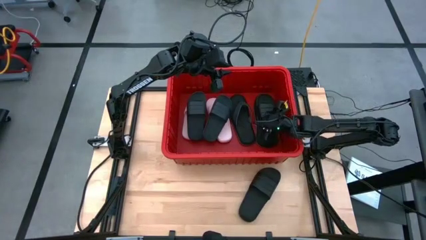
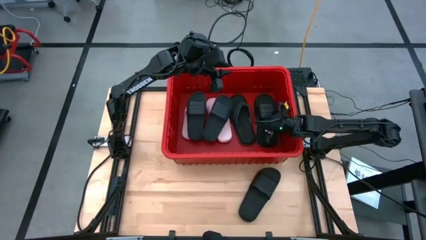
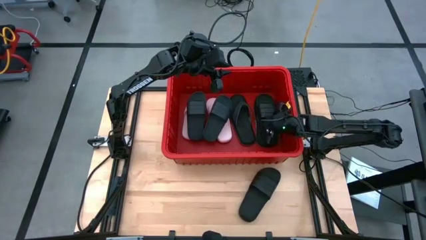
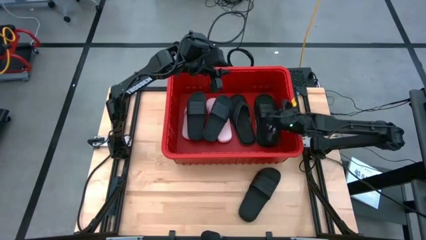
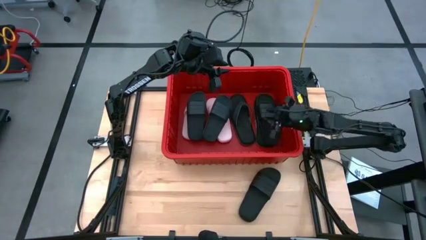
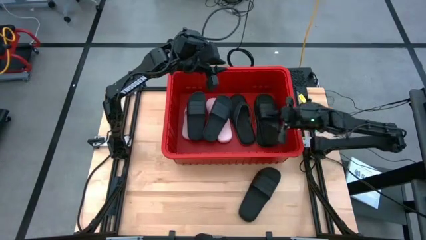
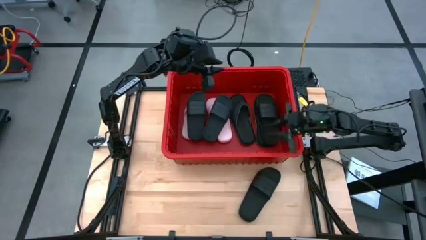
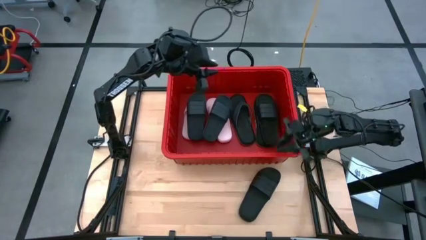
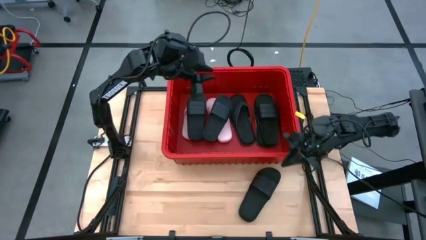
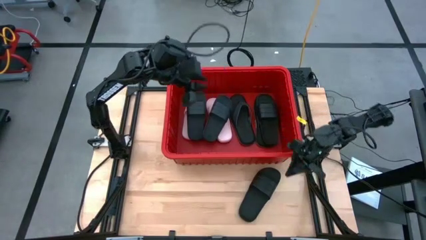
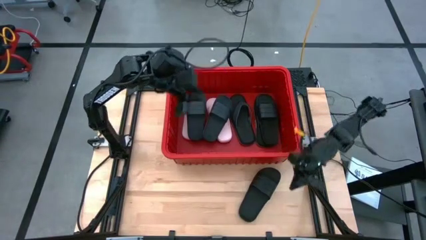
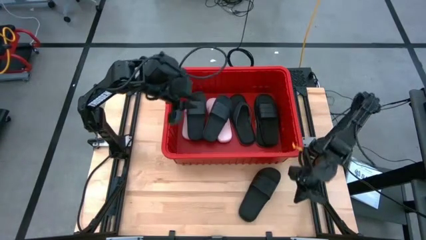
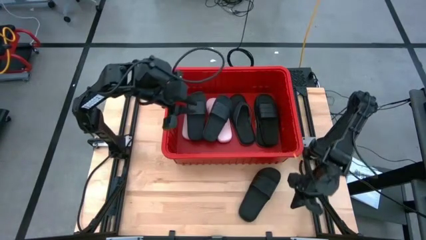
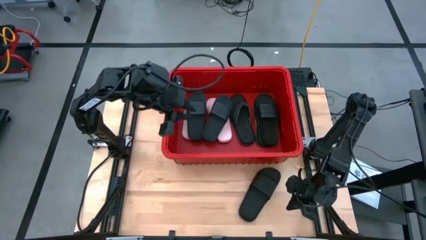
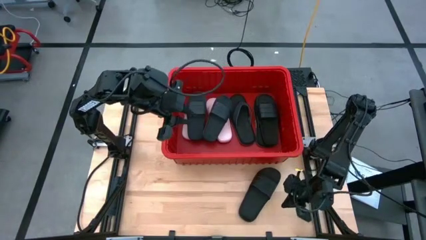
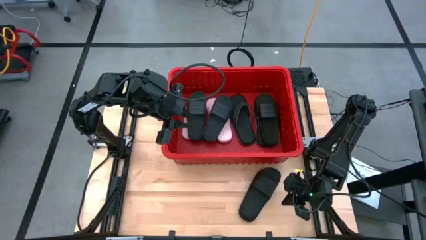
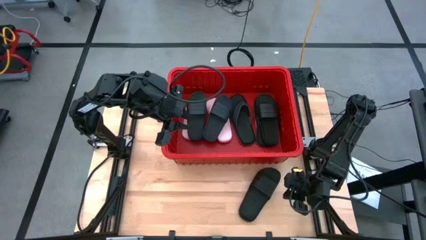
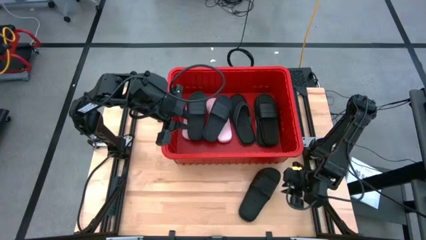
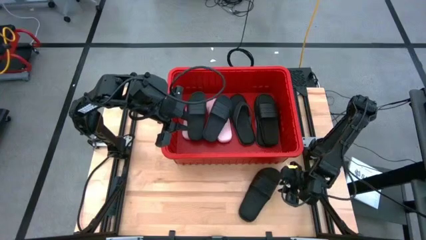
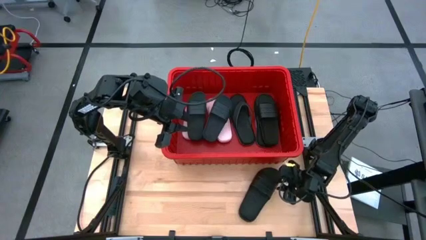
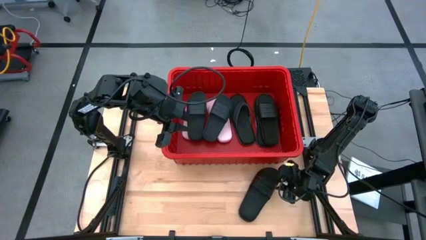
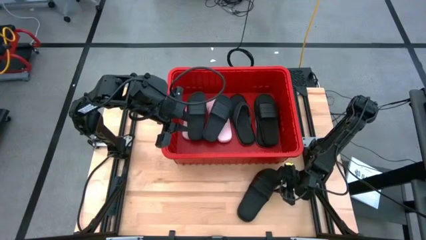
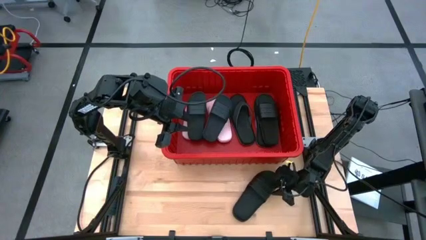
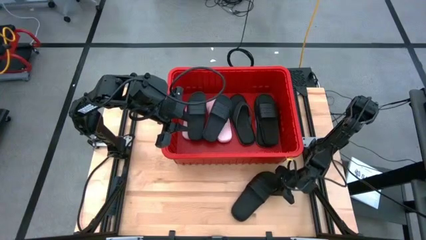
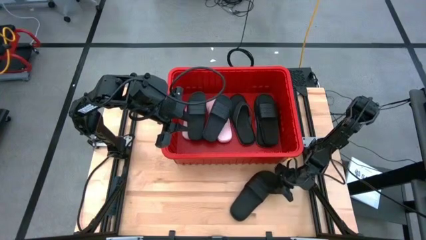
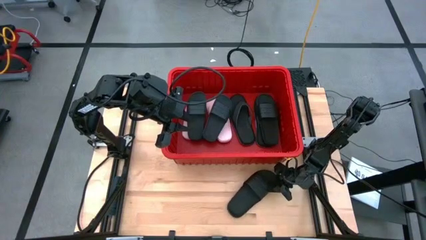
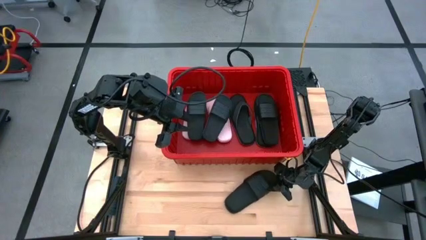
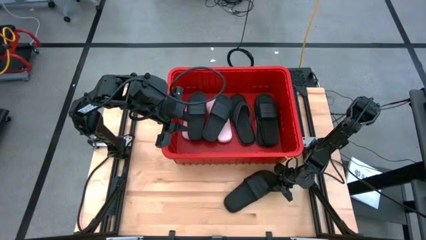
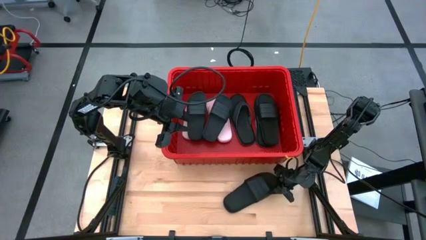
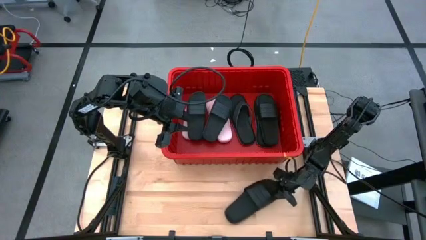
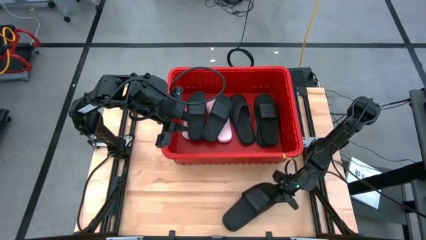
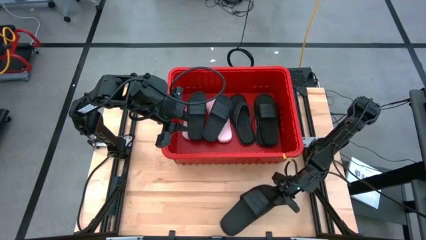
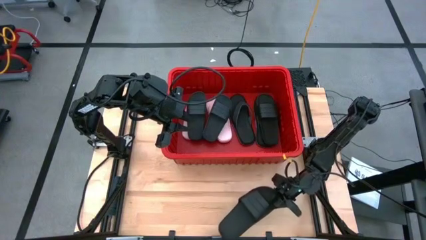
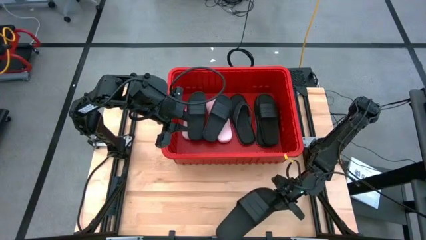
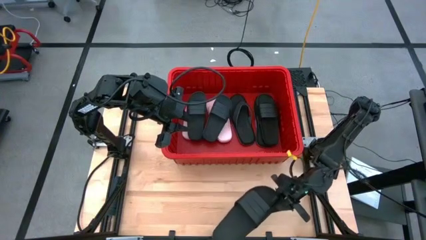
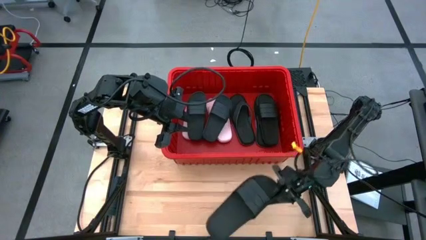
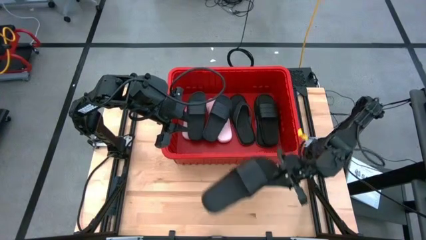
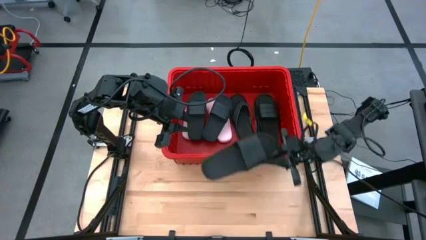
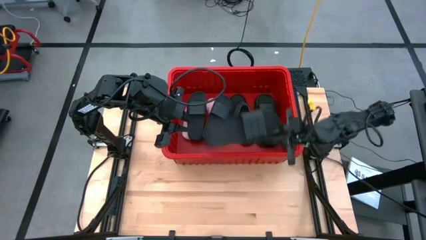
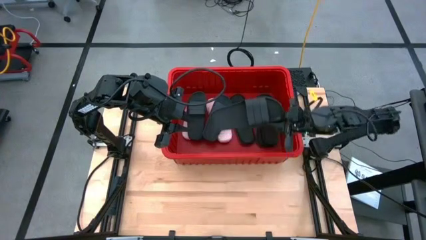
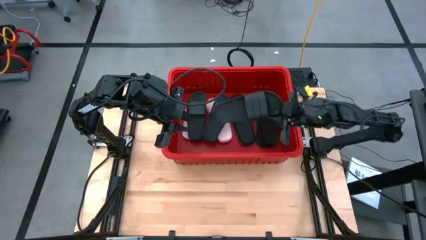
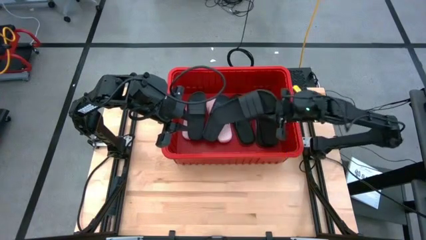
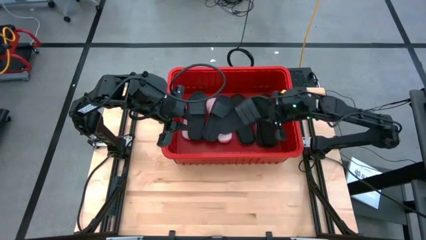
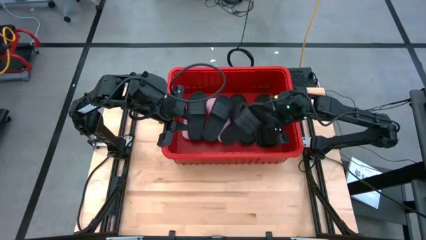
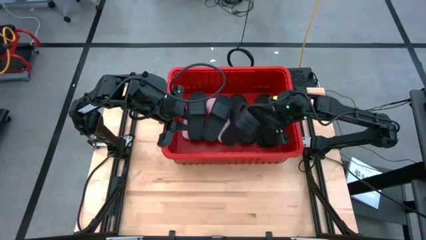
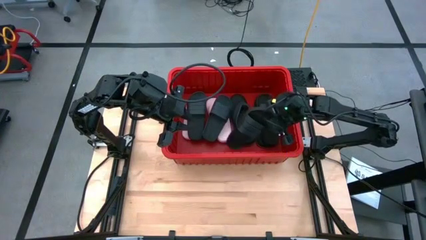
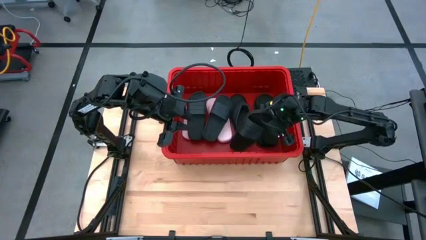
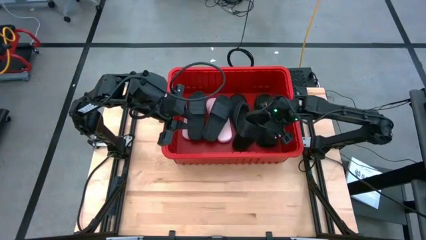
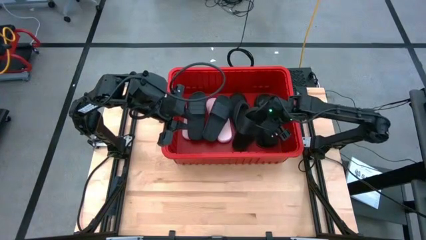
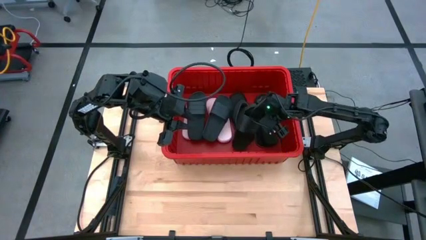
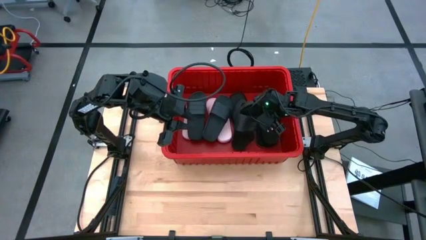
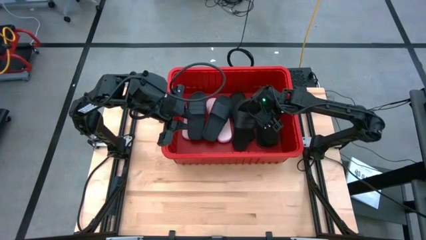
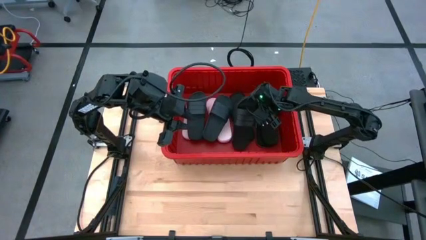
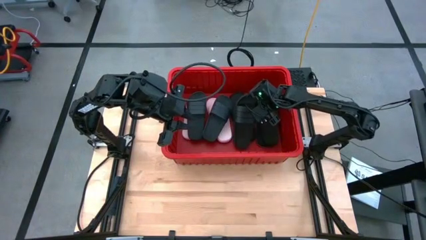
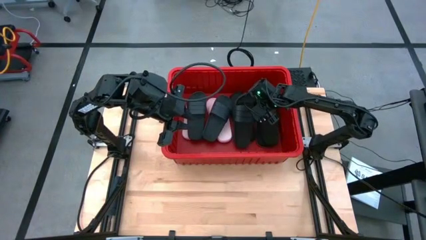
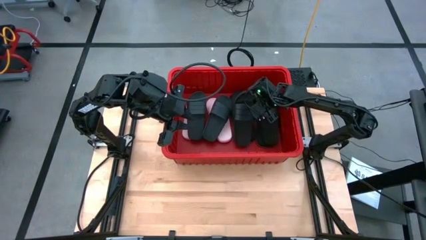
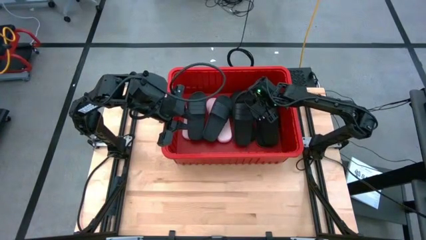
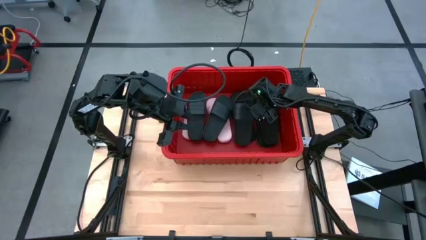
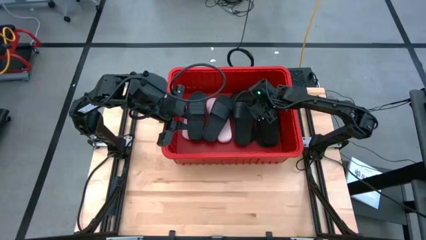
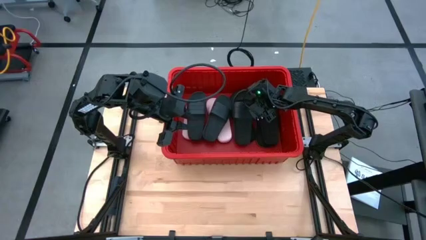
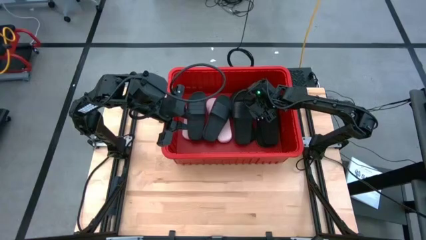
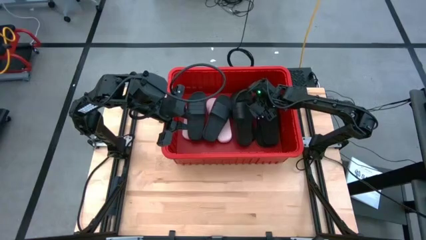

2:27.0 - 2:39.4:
Task: Pick and place slides into bin
Put the black slipper into the red bin

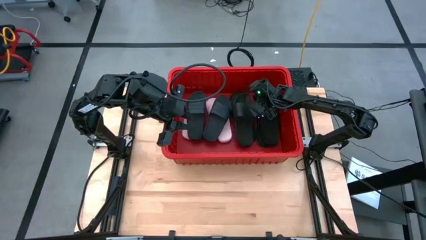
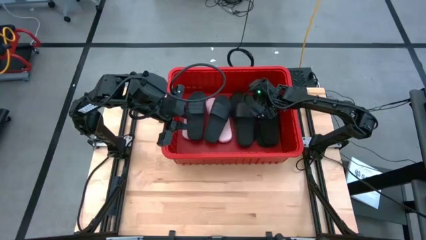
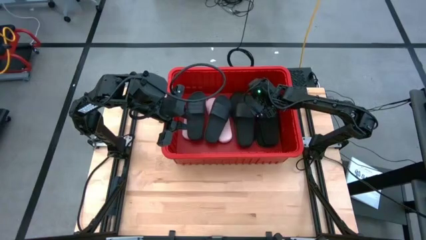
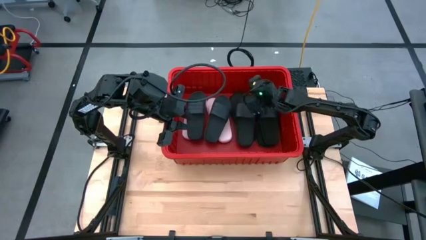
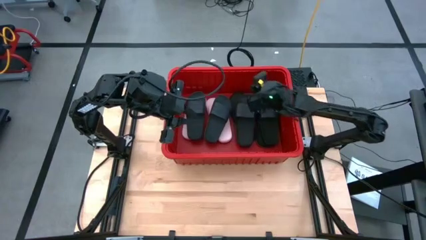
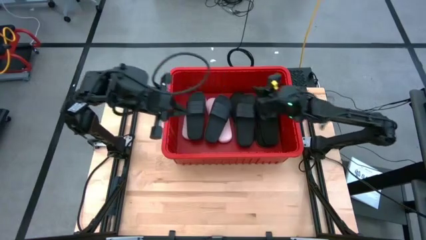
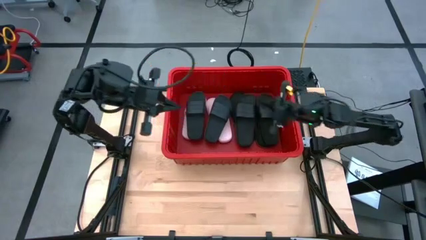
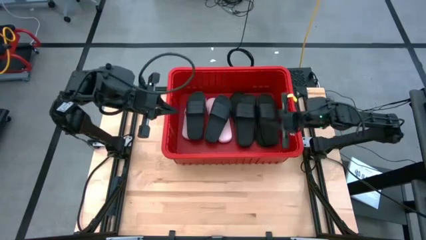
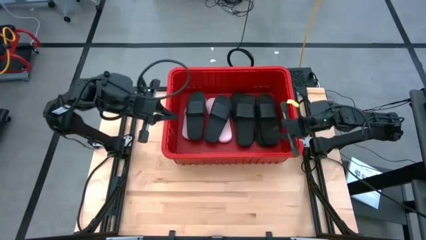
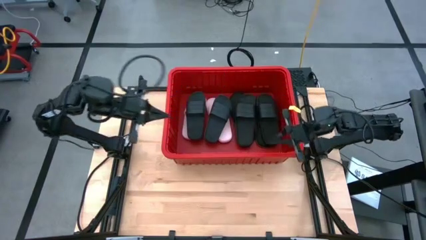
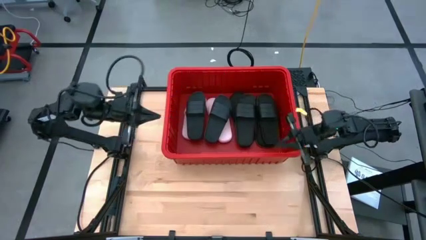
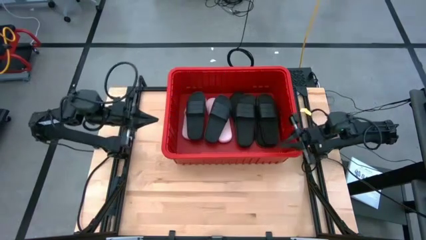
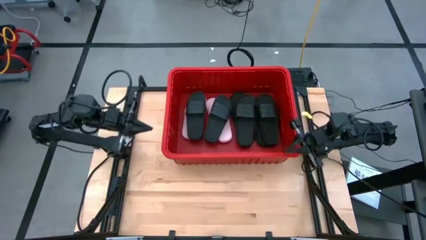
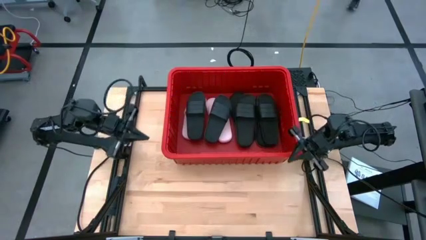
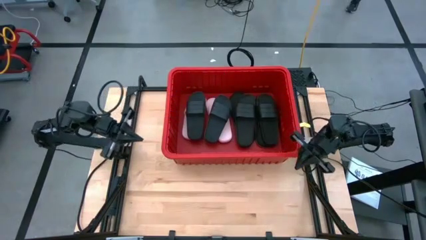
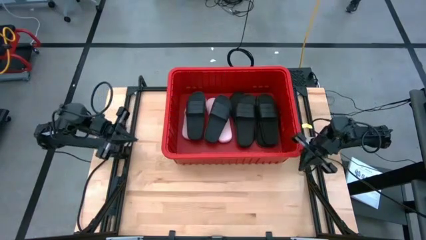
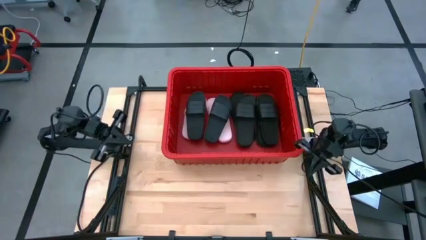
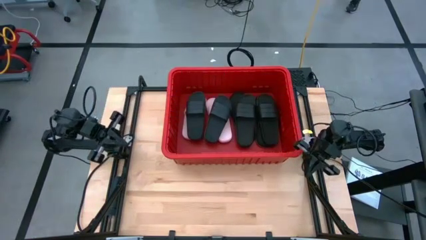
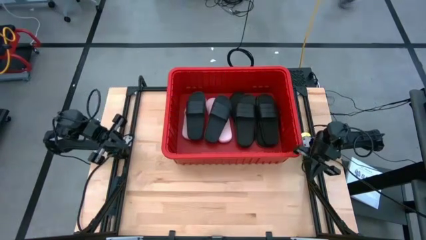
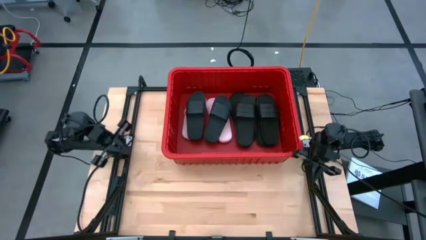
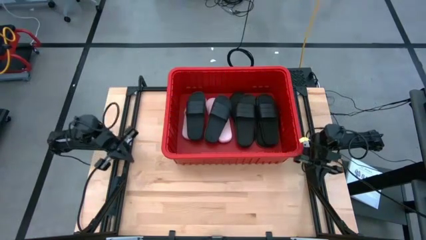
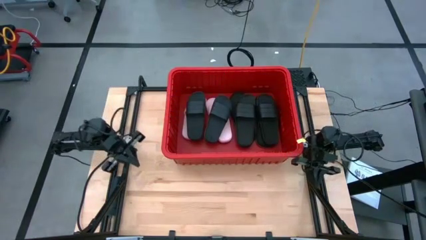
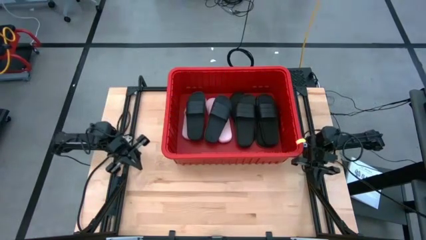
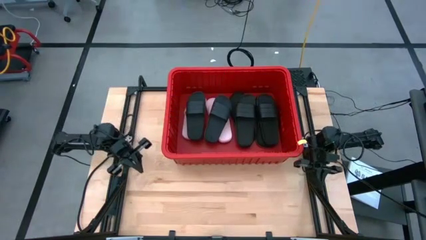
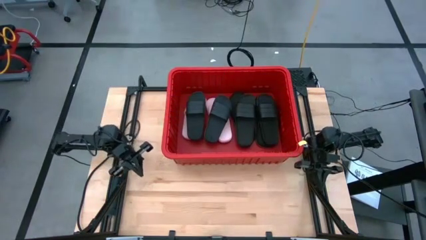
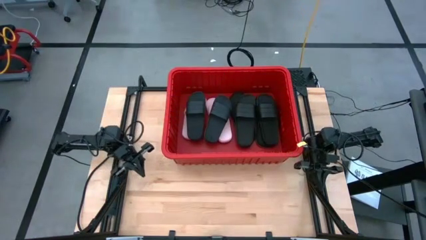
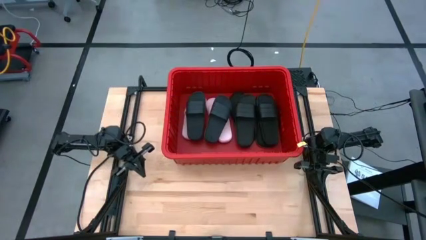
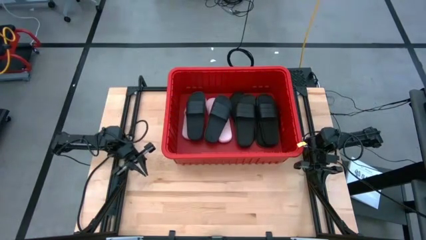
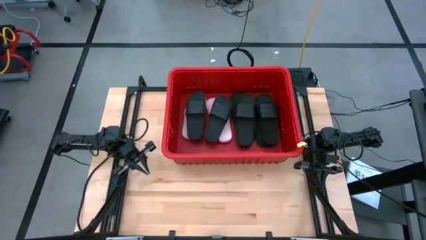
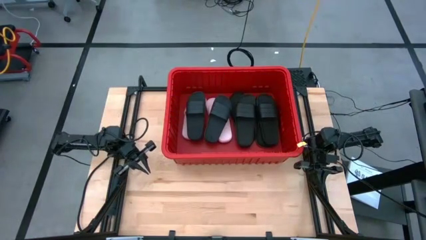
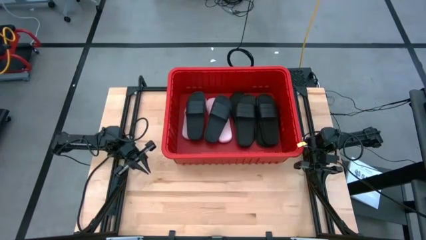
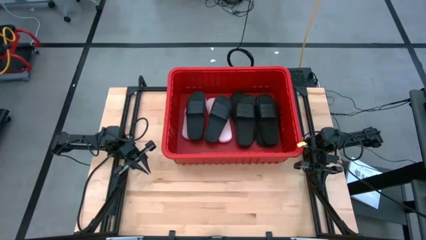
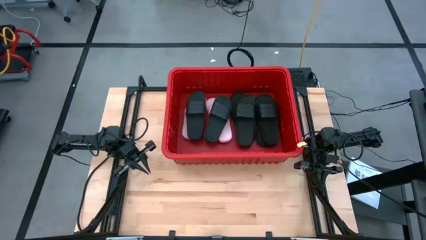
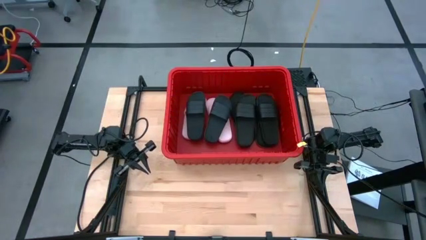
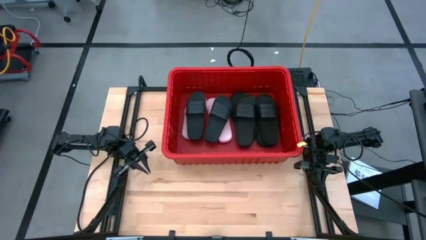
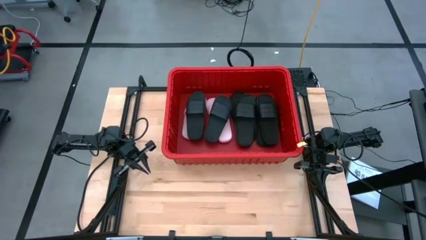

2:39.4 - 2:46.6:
Return to Home Position
